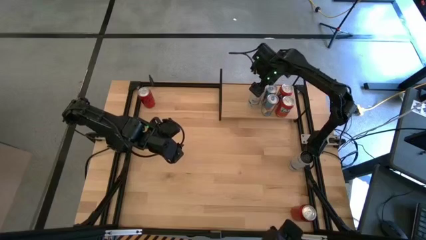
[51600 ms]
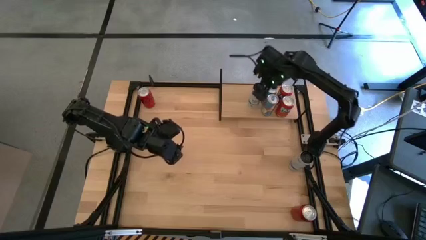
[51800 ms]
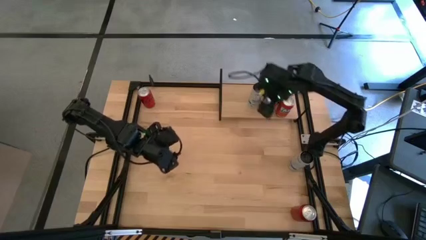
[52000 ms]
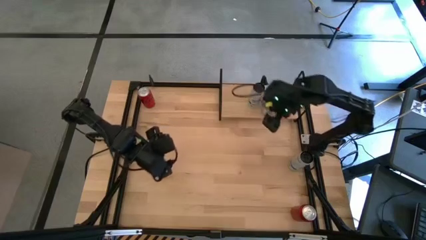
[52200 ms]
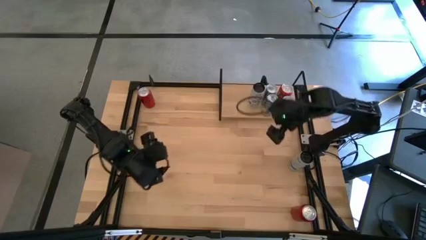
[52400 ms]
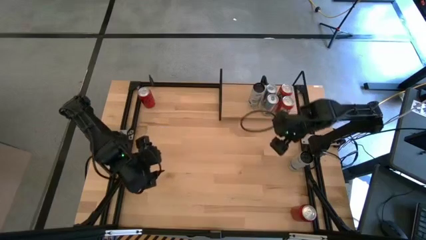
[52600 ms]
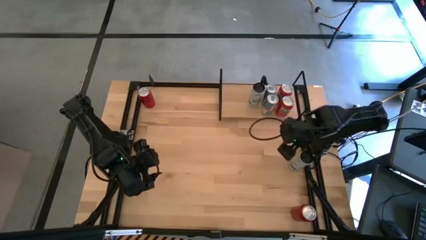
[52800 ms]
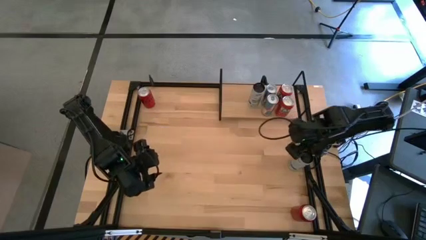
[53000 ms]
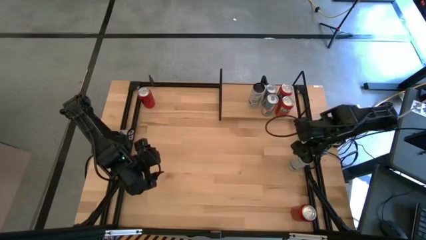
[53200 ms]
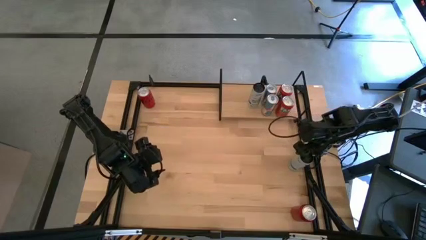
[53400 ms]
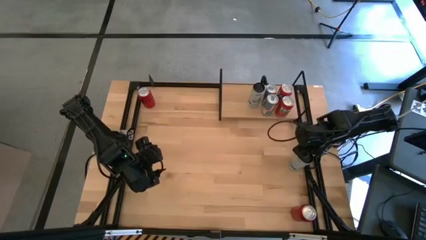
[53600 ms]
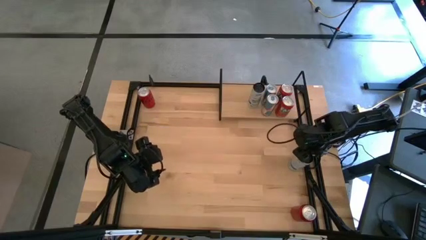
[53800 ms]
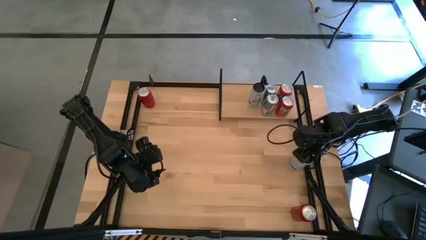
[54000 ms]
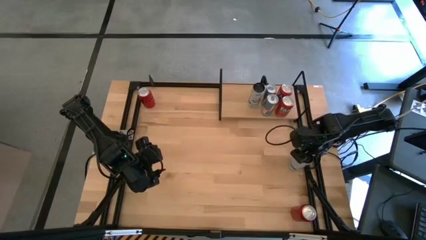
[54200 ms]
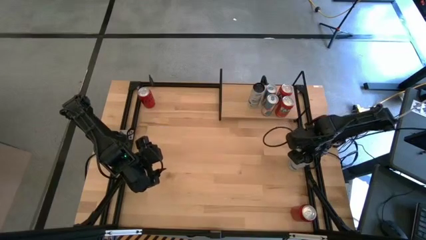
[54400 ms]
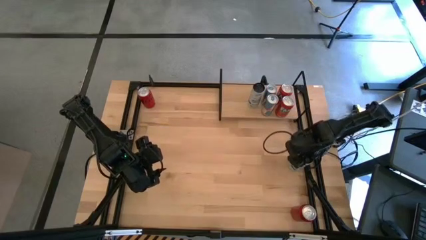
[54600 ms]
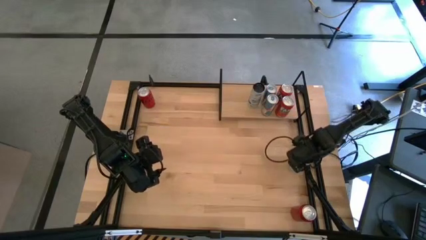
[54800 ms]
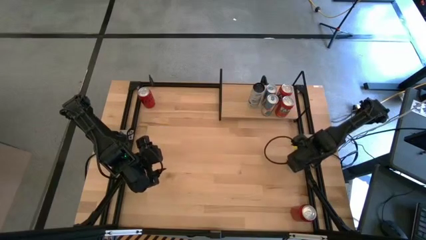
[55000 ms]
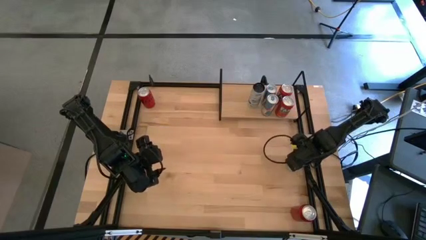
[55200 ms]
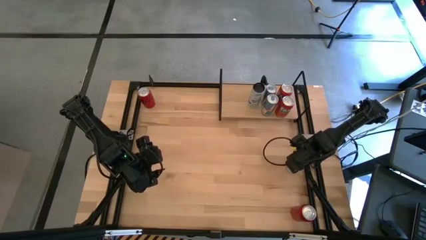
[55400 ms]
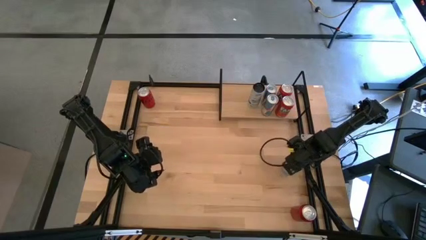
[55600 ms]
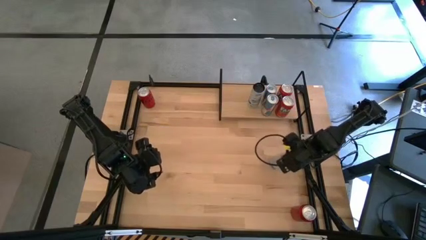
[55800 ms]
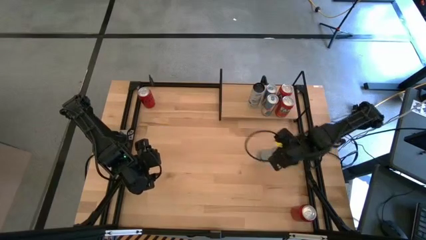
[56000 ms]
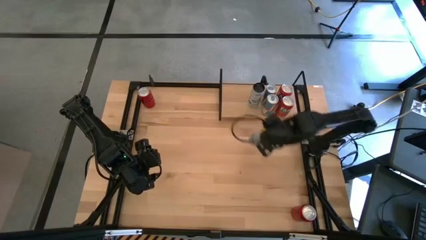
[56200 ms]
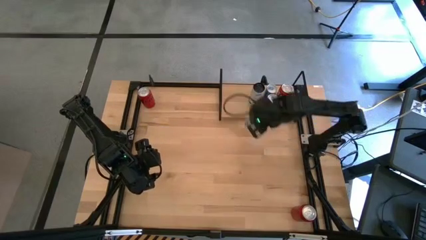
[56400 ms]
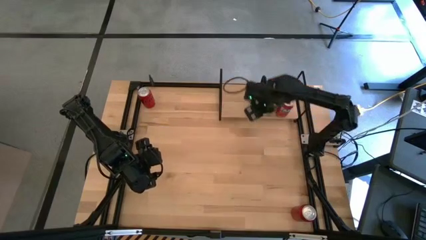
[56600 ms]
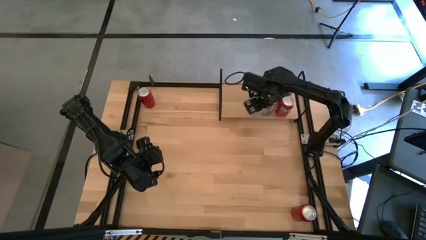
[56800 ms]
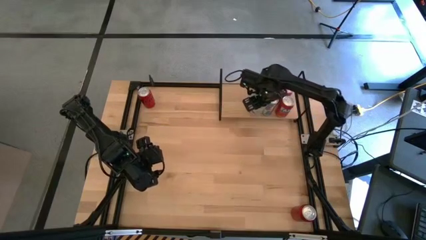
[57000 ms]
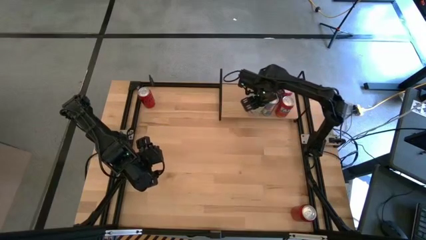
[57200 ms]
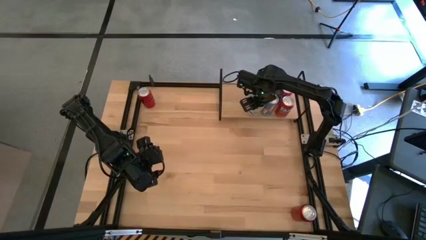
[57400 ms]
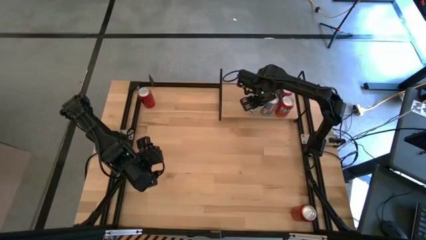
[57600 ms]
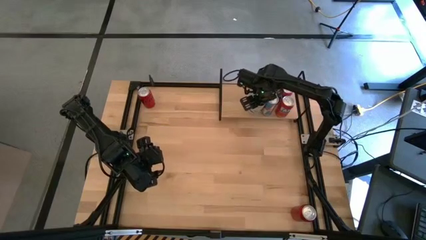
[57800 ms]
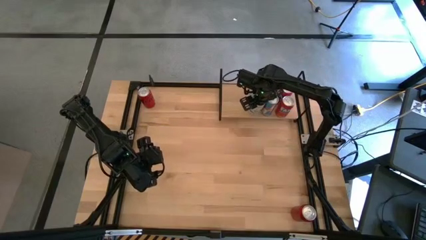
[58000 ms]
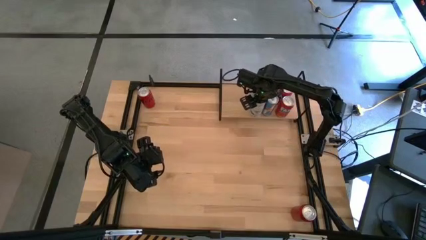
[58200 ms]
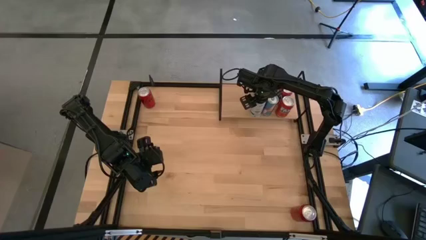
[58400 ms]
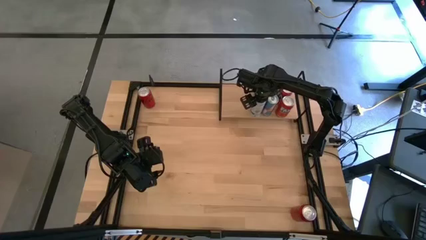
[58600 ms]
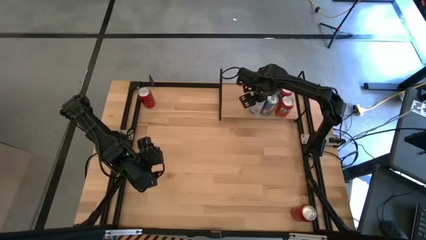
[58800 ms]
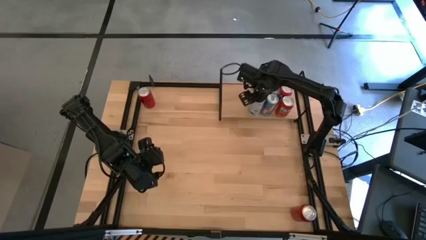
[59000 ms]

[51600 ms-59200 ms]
Task: Place canned beverage on shelf
Put the white soda can on the shelf aligned with the other white soda can

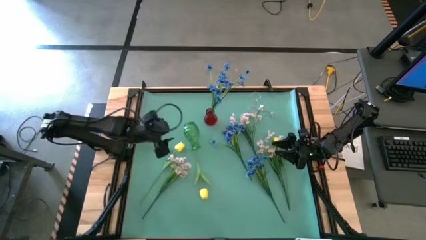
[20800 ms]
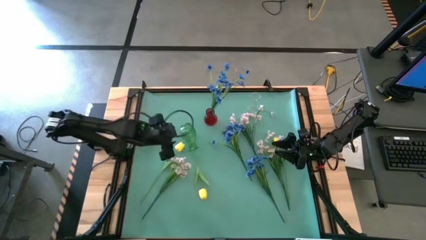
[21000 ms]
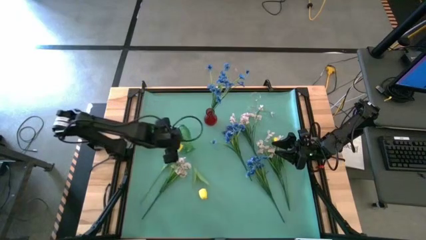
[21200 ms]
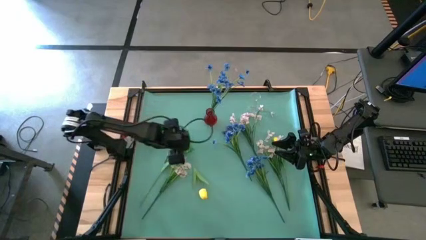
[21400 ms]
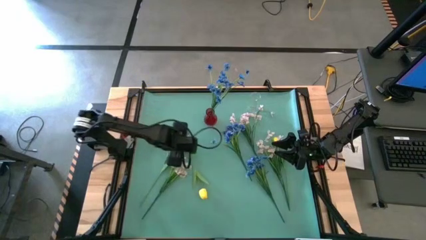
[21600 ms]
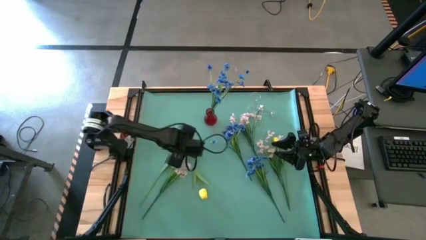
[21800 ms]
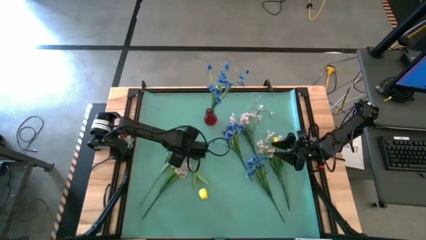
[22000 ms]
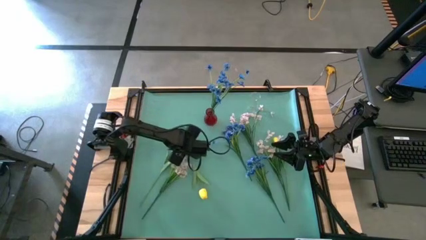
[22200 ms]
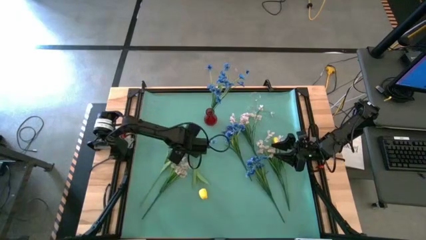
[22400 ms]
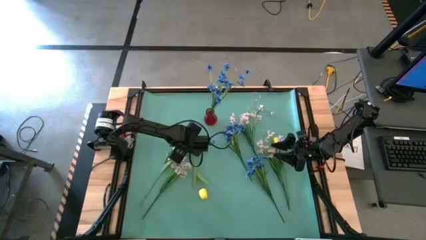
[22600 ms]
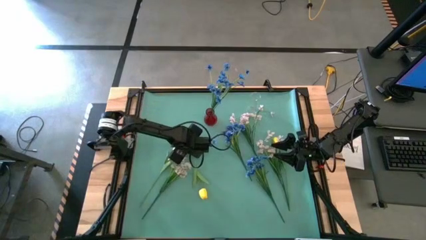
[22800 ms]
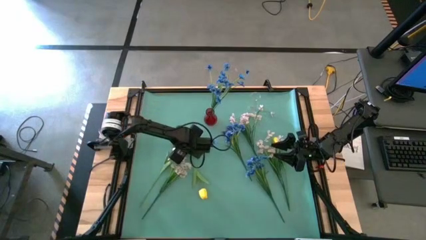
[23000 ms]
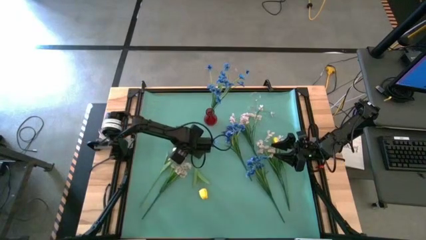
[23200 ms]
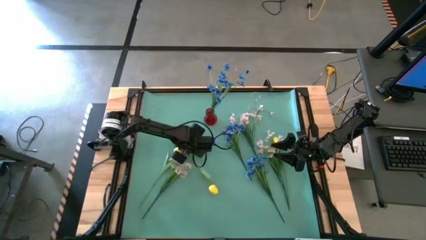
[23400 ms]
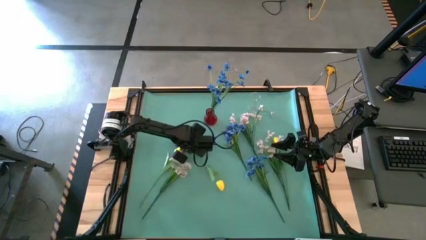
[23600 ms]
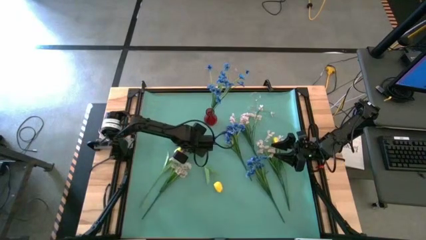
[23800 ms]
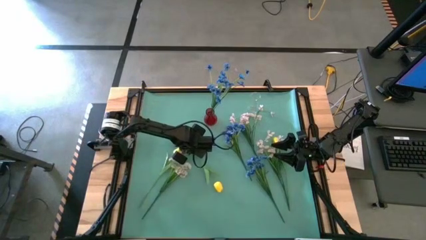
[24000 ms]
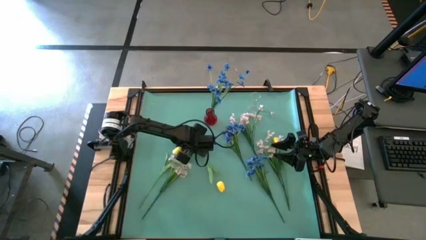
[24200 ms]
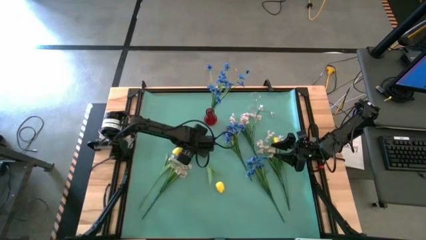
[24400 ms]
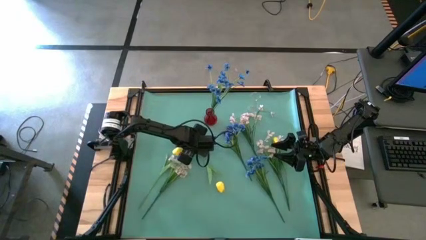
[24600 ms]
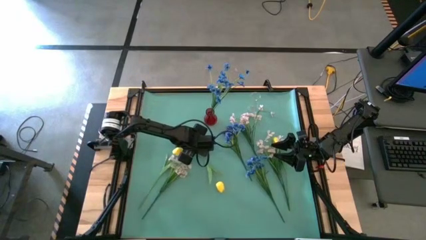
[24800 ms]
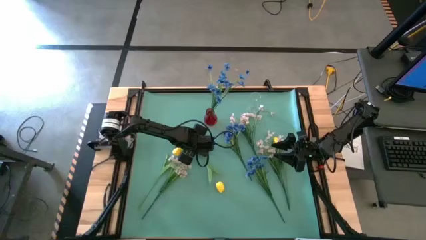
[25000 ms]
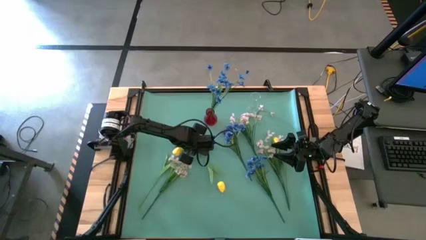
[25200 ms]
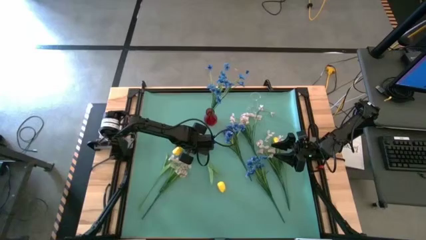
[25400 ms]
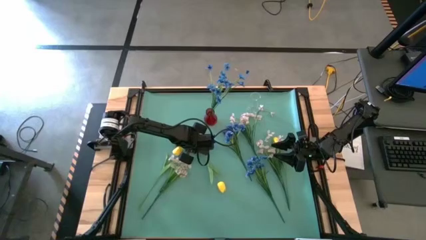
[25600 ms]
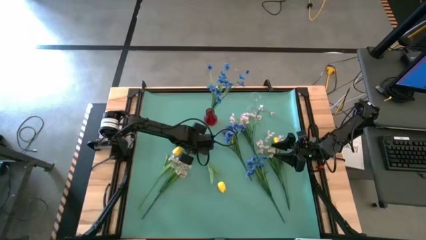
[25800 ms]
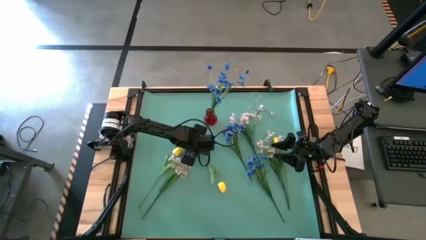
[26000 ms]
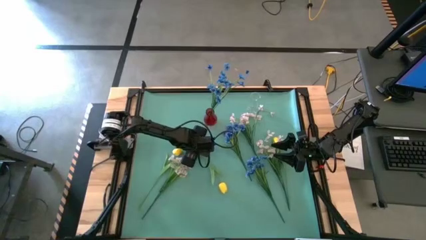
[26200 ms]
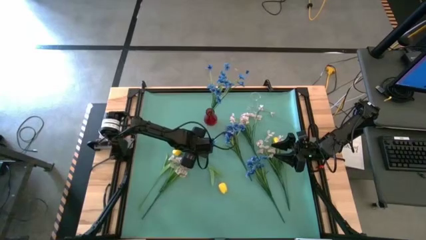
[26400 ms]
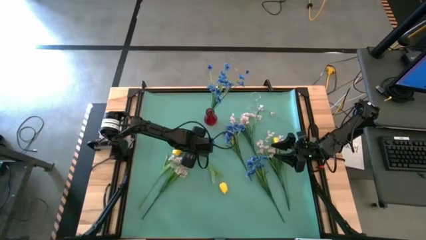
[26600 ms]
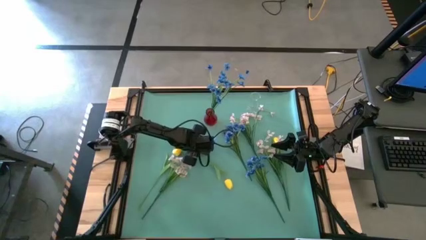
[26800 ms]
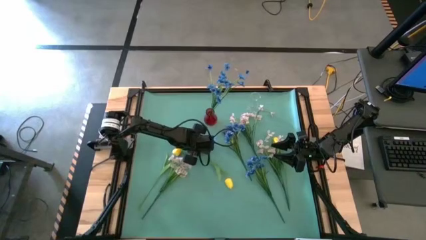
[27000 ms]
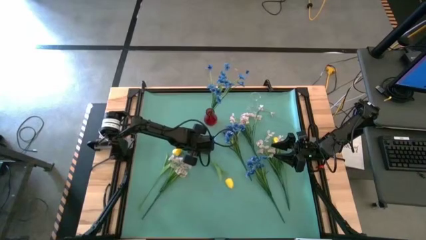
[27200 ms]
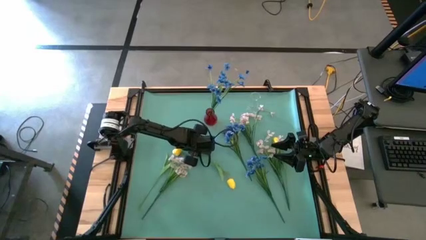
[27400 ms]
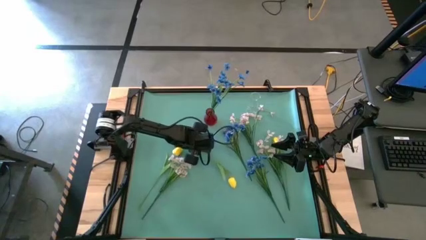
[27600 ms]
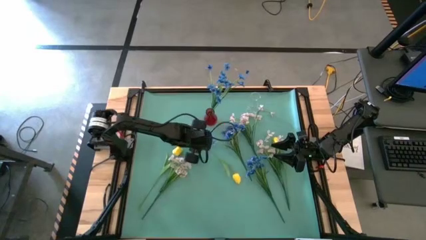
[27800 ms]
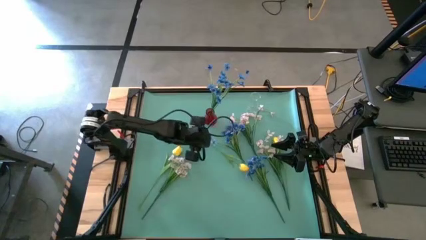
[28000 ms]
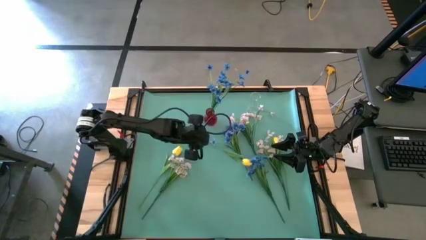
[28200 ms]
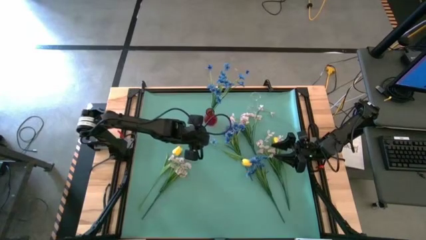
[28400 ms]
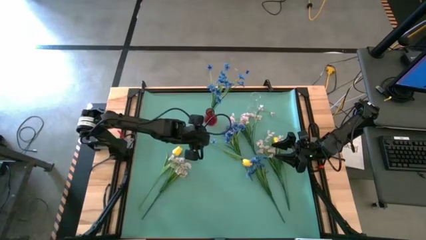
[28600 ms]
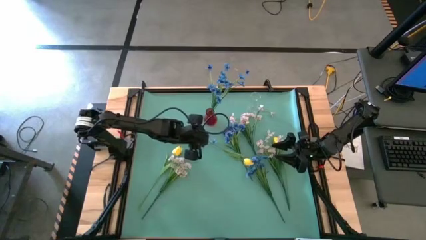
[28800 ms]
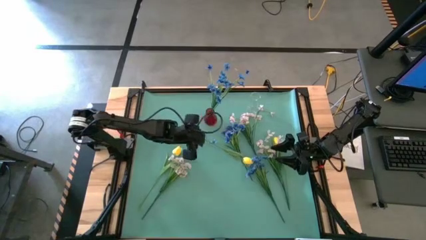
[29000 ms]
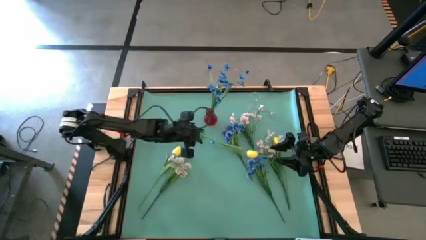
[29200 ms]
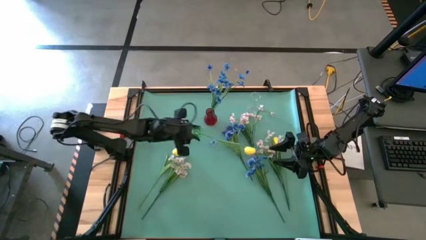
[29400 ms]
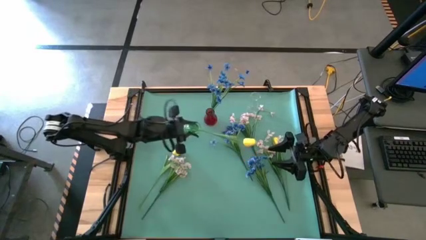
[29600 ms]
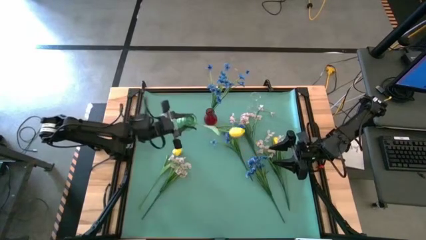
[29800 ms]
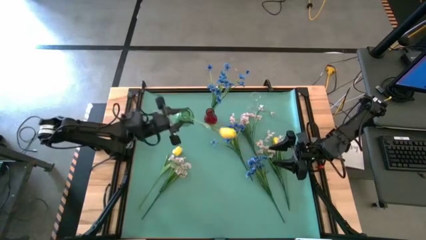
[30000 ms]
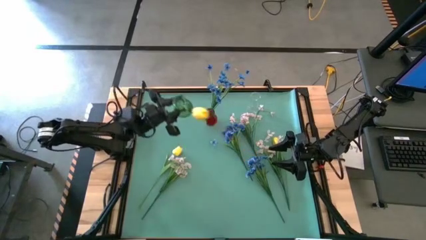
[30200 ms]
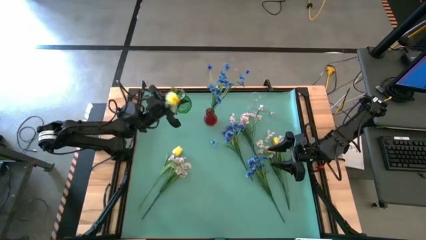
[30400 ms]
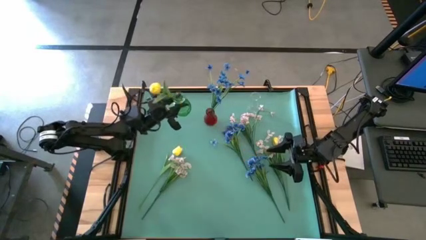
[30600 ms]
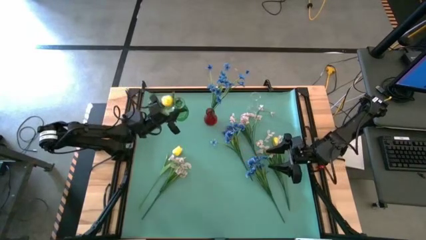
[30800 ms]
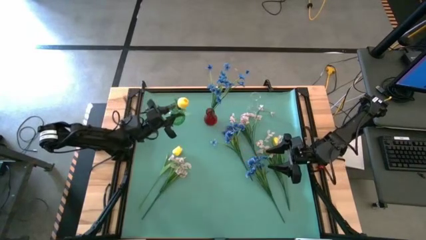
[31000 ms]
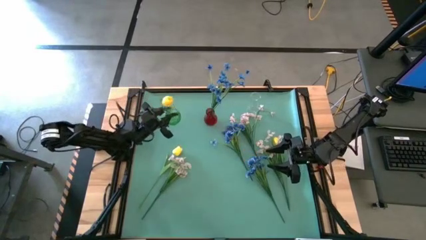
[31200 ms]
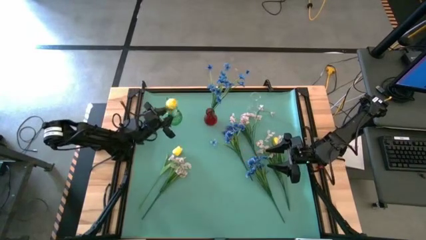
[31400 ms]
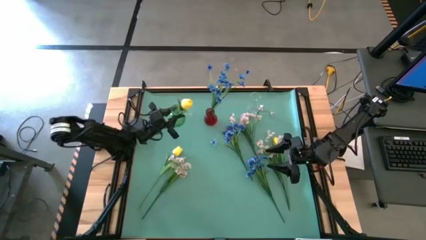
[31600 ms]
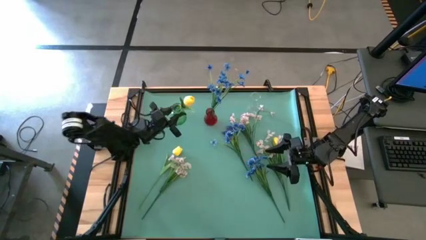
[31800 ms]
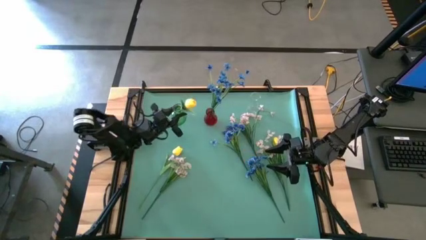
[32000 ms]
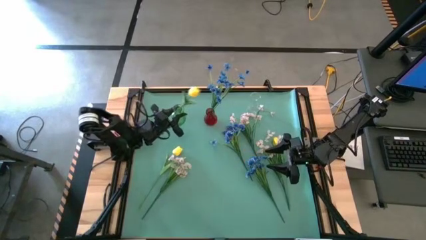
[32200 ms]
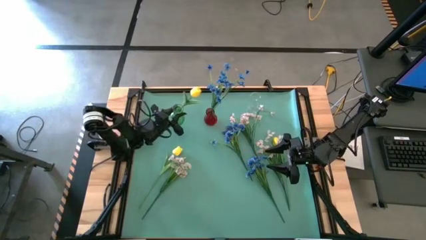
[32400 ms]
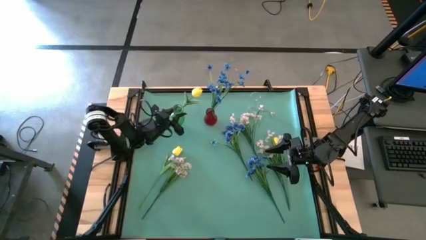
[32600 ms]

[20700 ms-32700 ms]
Task: Sort flowers into vase by color
Put the middle yellow flower into the green vase
